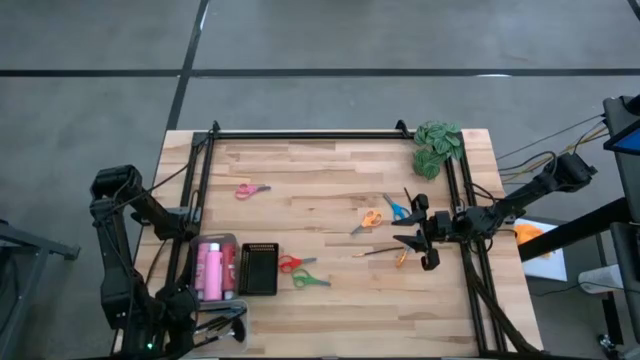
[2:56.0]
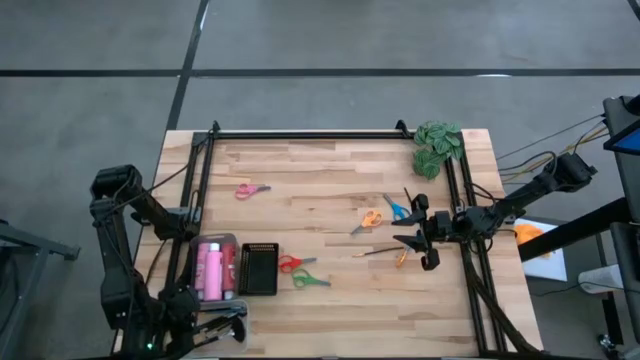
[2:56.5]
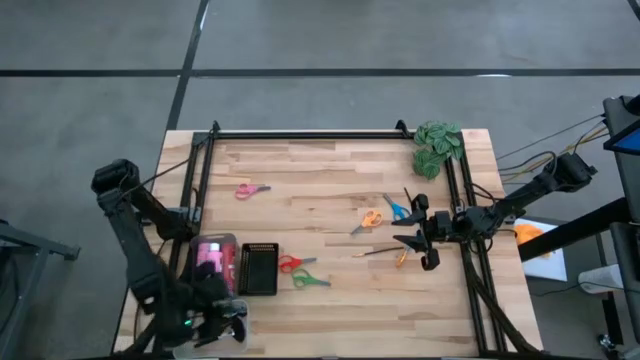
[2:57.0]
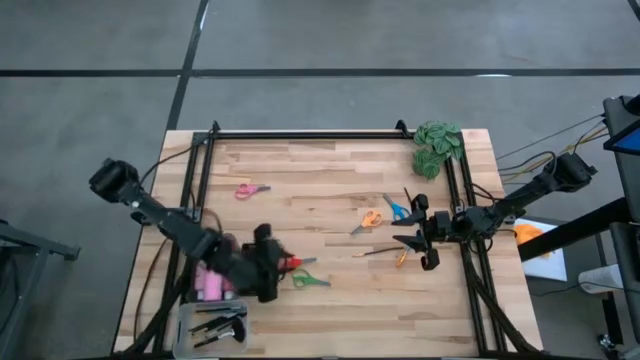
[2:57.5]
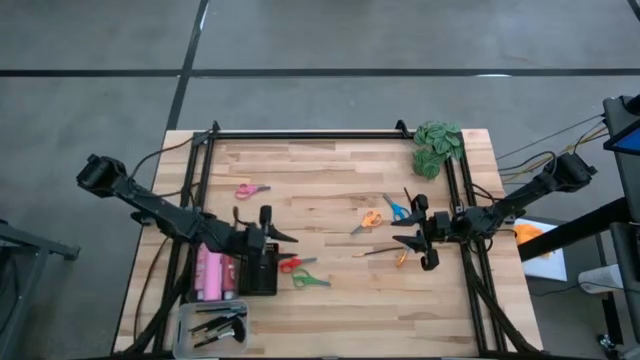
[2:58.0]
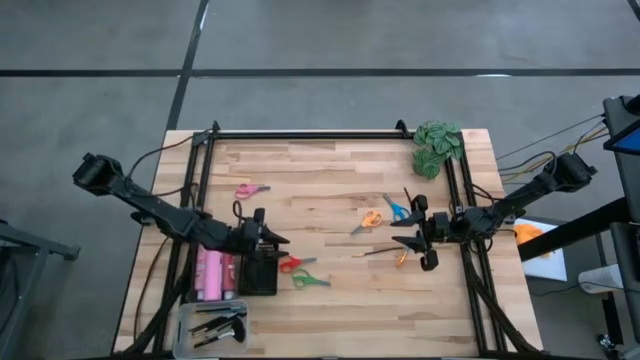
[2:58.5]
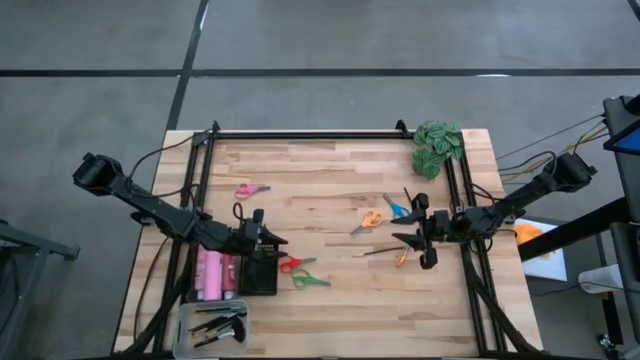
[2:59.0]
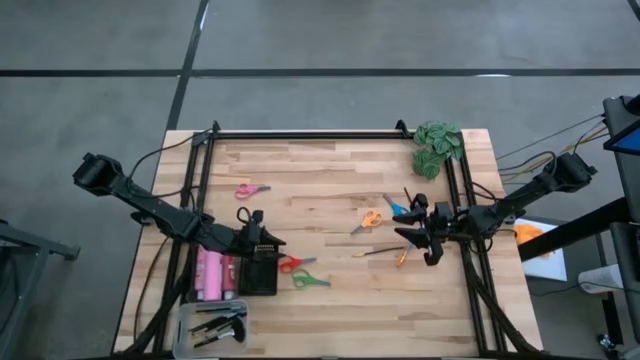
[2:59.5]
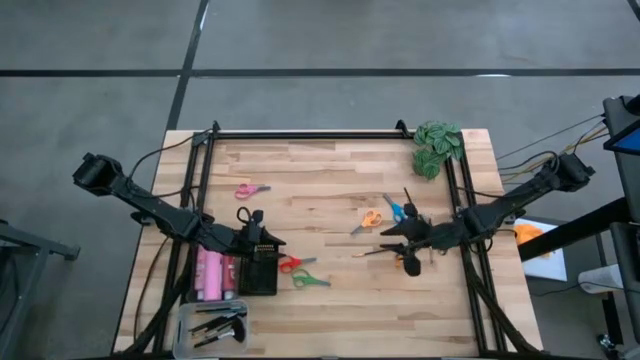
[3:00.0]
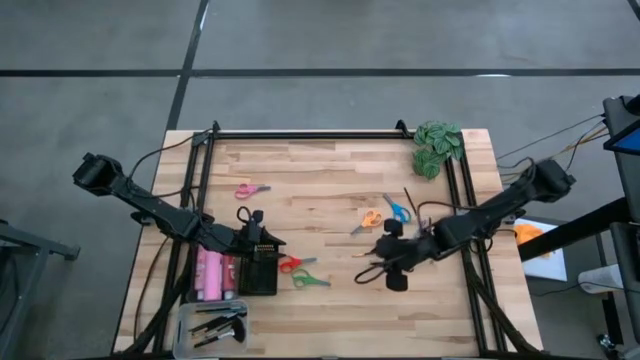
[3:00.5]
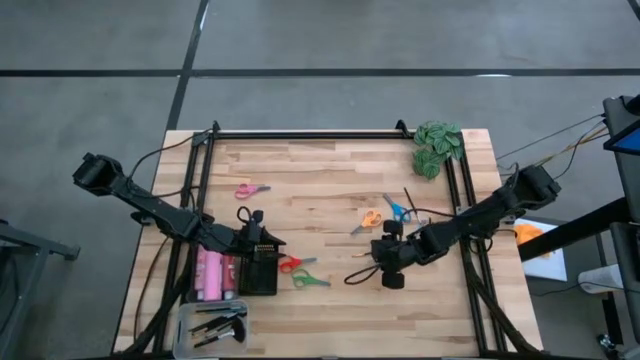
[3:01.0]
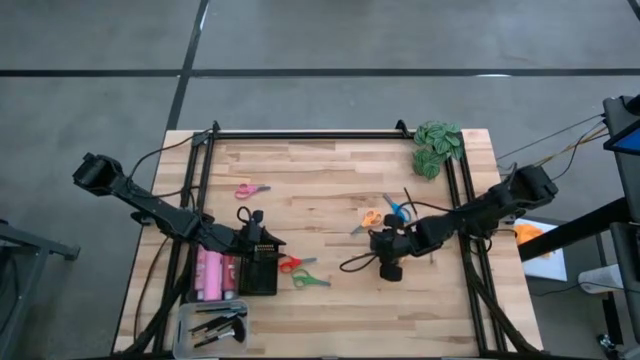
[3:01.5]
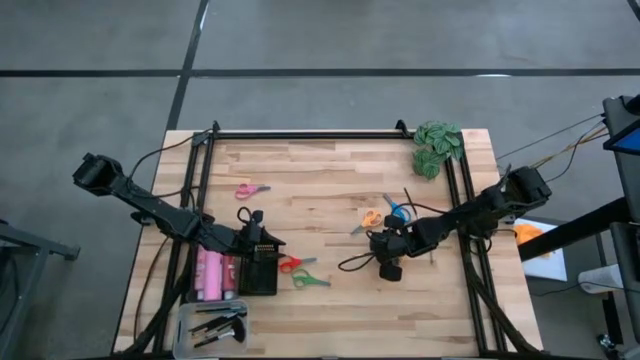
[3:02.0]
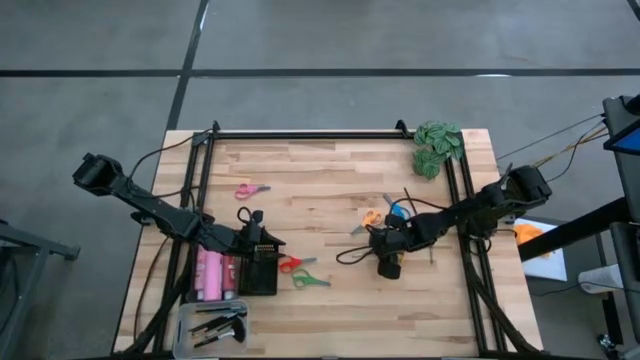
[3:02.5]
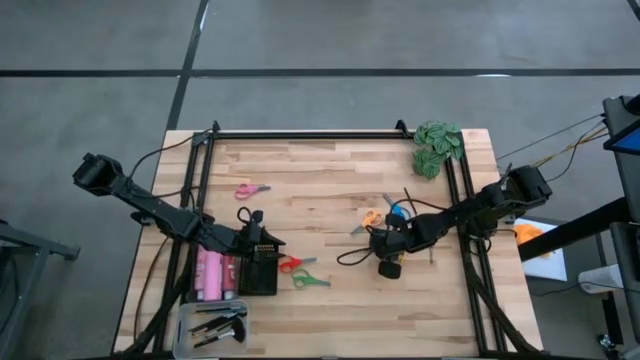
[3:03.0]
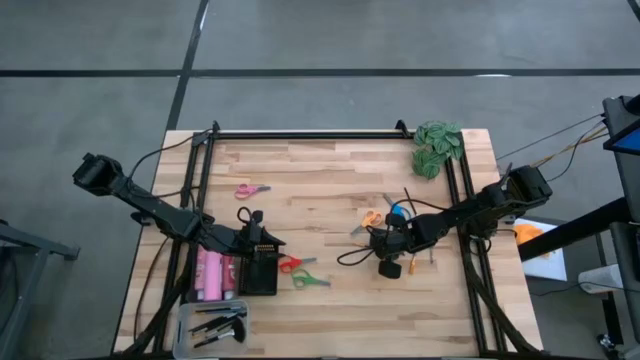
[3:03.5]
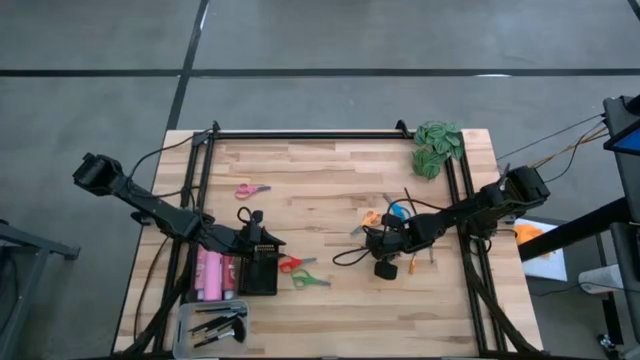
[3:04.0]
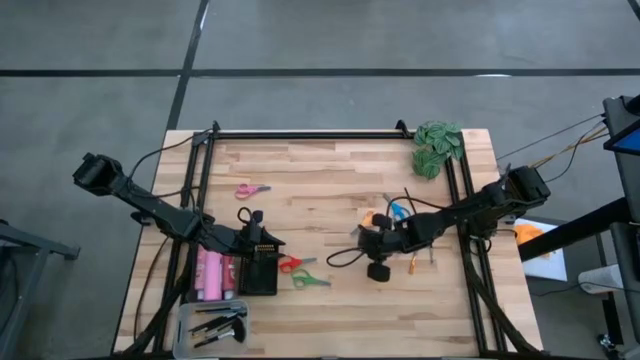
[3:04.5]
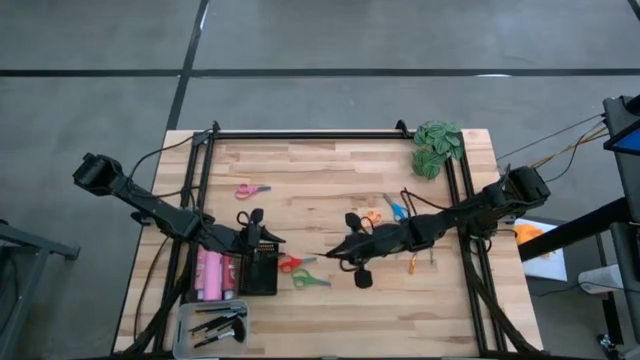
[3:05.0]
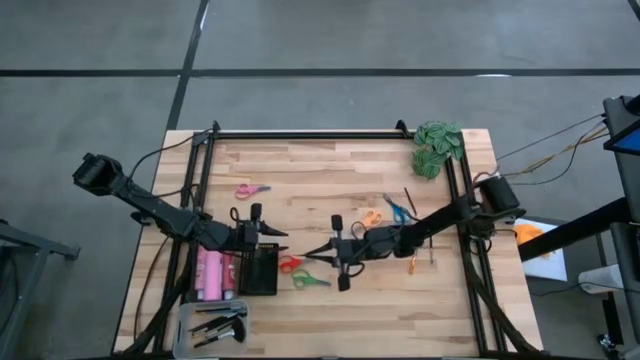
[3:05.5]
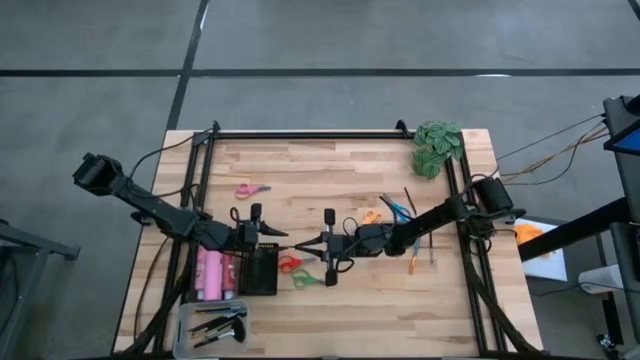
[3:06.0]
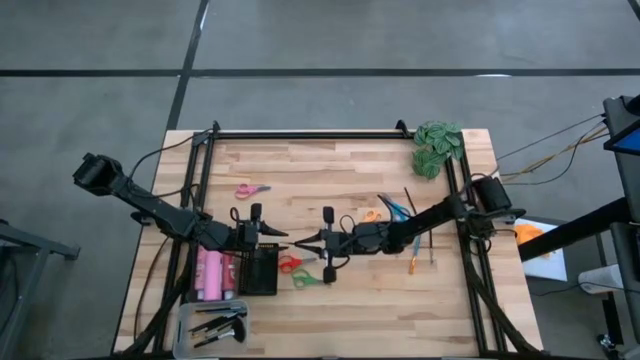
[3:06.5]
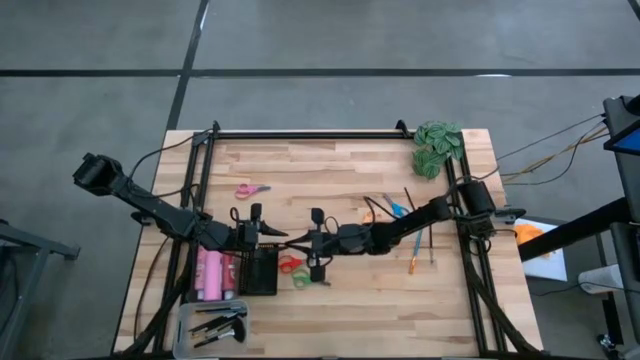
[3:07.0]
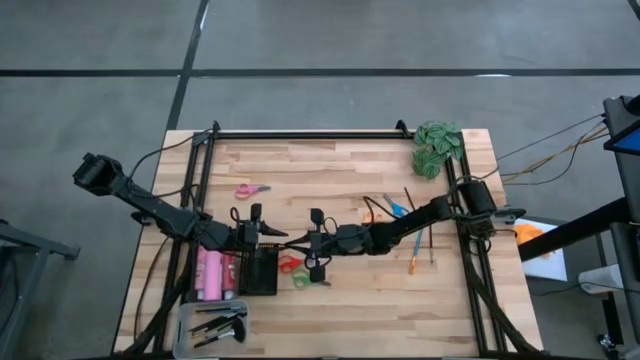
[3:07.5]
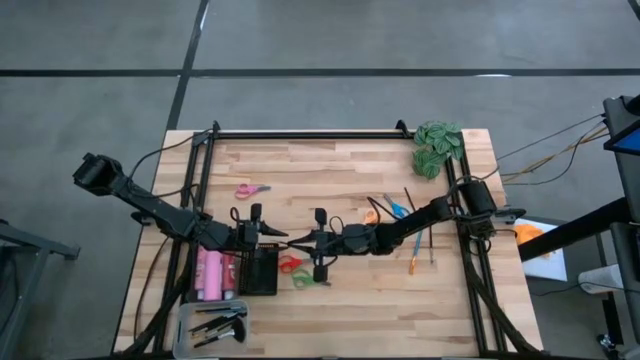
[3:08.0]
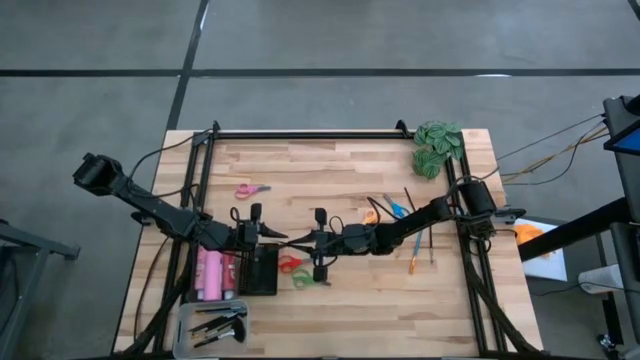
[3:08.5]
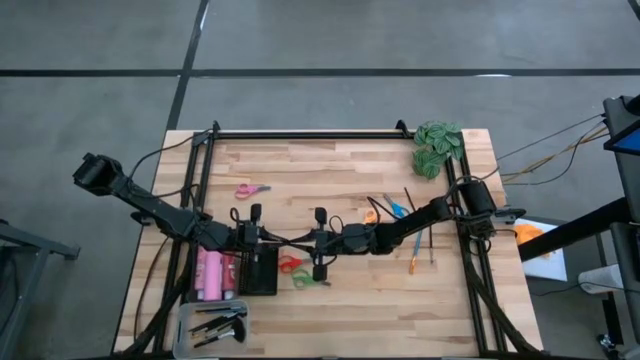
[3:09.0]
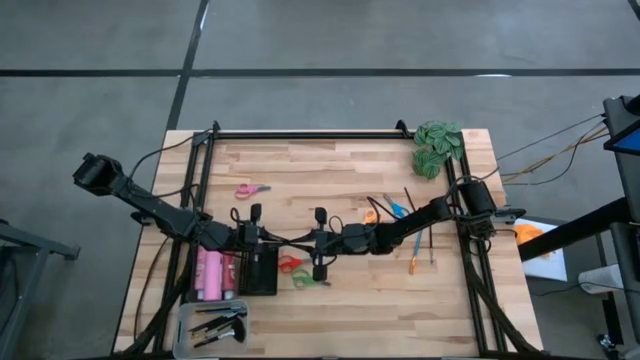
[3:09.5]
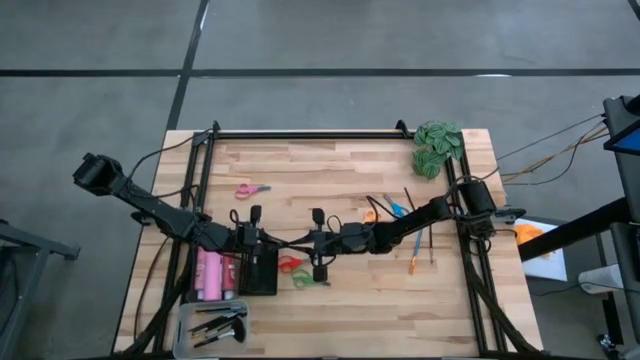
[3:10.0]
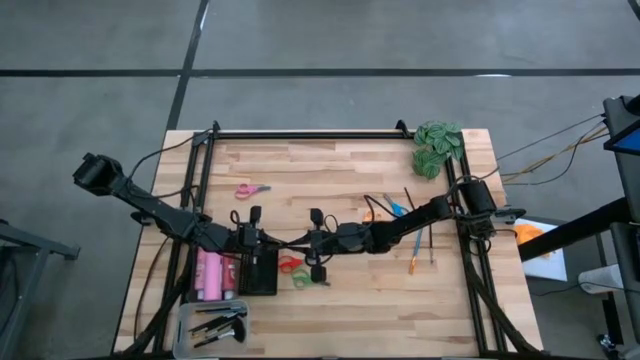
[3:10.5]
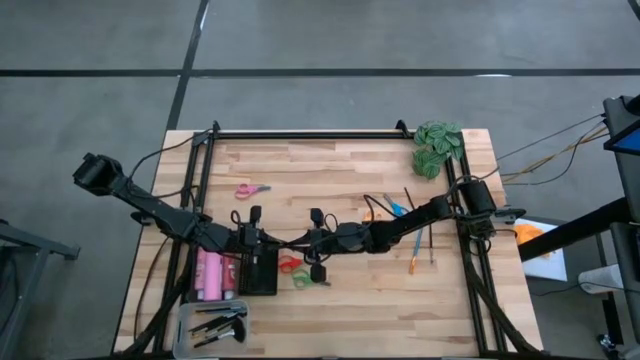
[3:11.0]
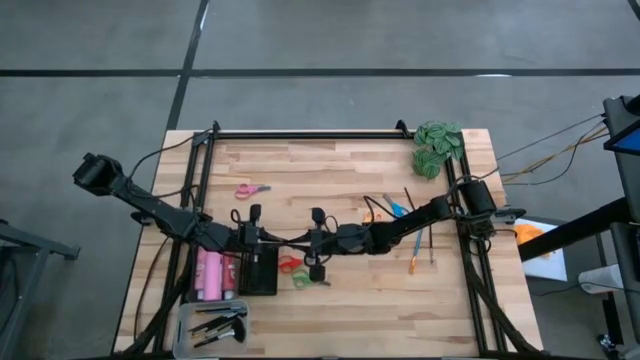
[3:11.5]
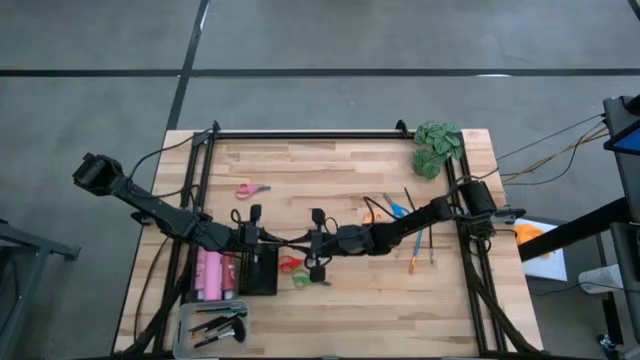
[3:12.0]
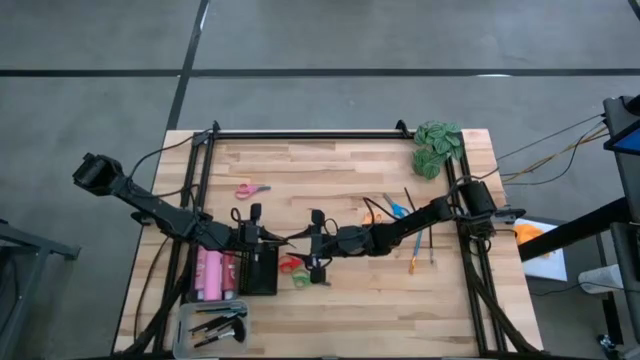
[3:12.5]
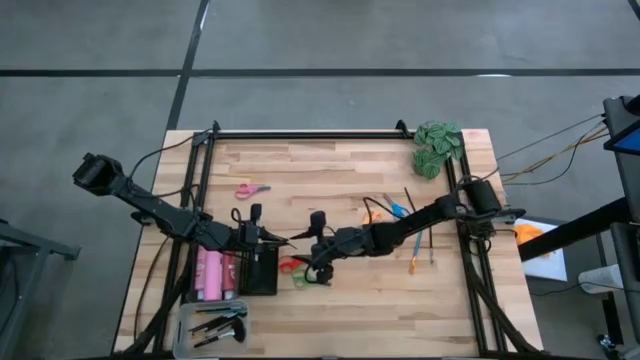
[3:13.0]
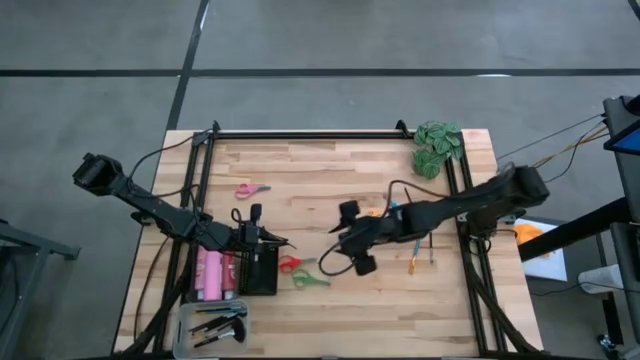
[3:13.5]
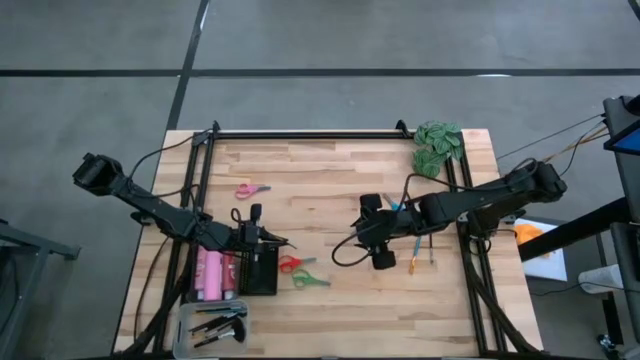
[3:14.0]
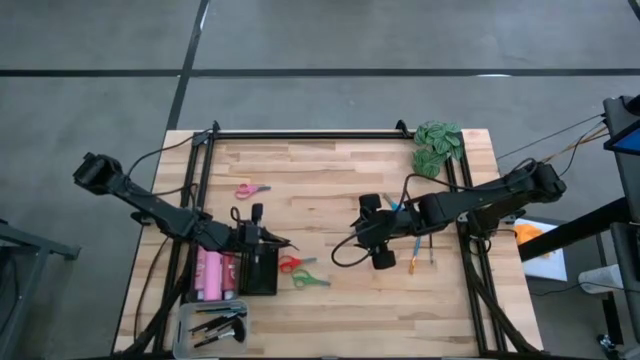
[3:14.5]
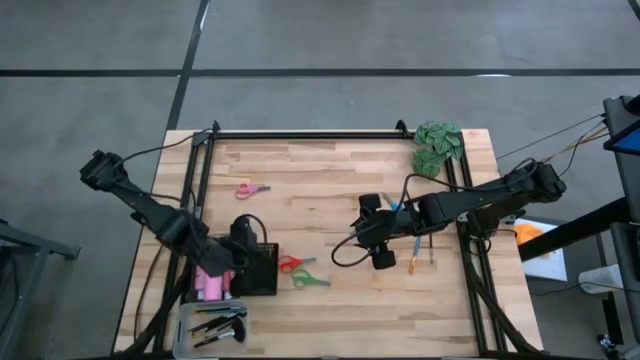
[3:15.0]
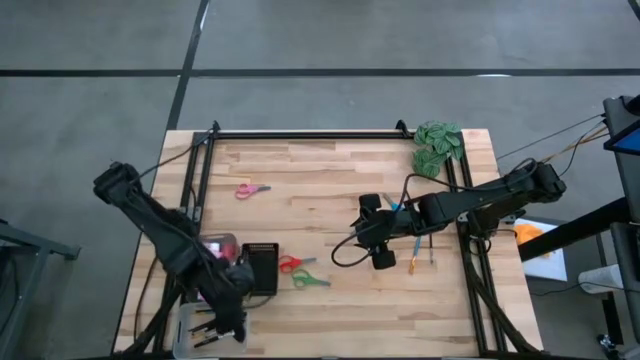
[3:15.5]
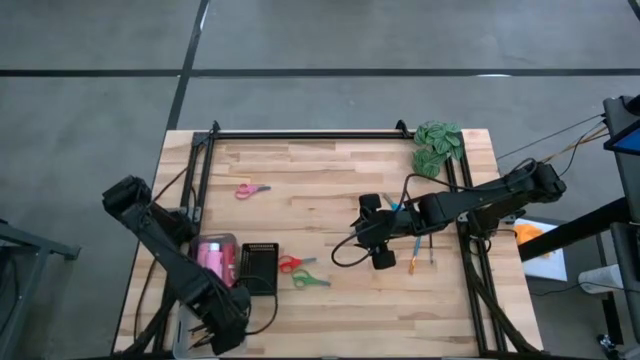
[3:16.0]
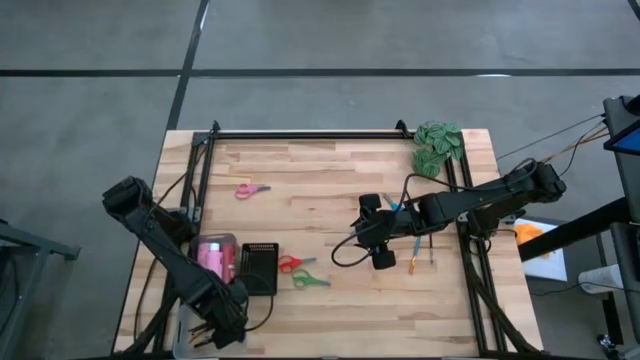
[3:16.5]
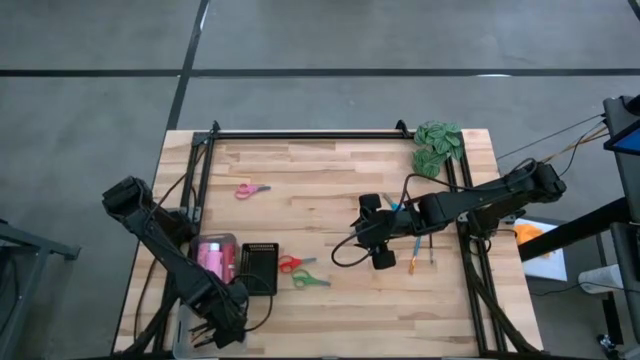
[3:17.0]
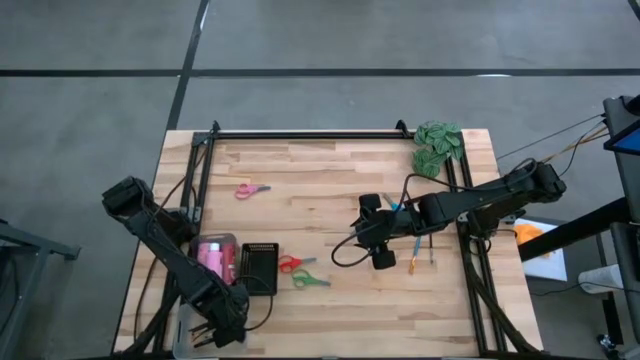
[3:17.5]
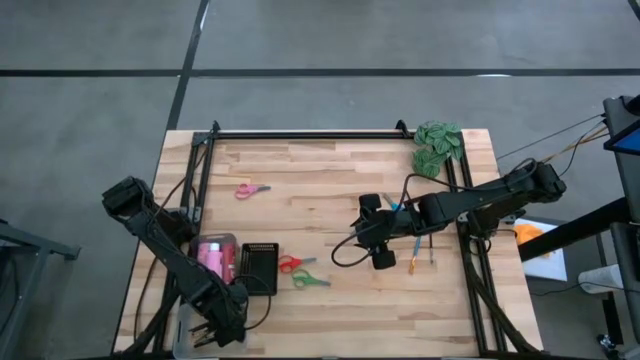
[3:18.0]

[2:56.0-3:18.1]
Task: Pick & Place Paint Supplies
Put the gold paint brush into the transparent bin

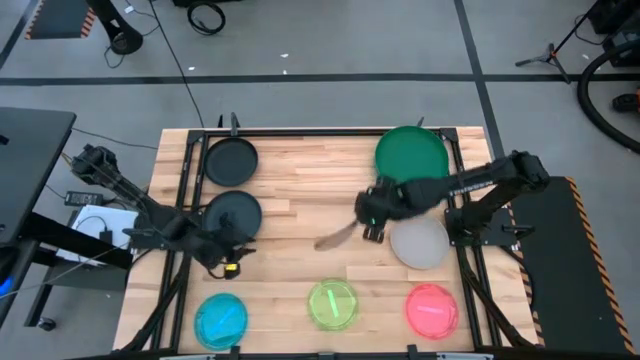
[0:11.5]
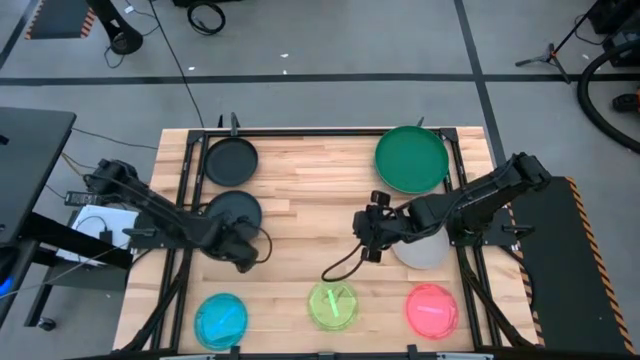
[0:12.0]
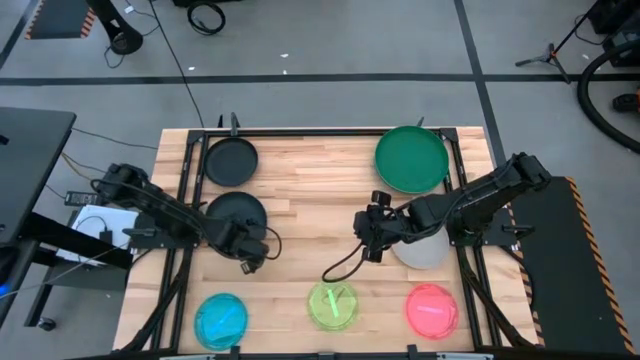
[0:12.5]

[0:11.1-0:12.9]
Task: Stack plastic plates
Stack the bottom black plate on top of the black plate
